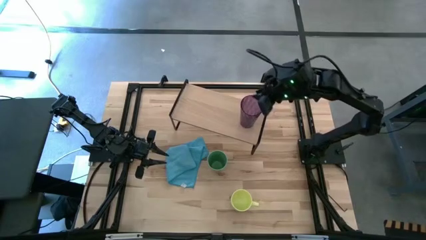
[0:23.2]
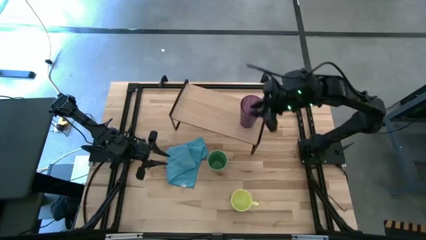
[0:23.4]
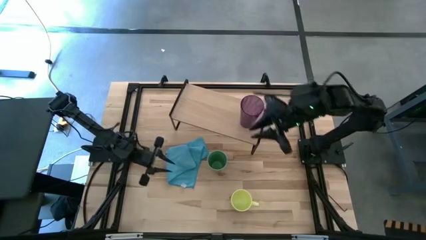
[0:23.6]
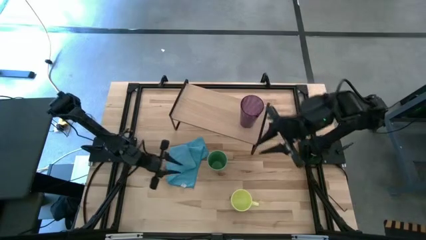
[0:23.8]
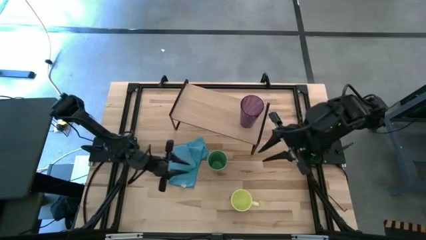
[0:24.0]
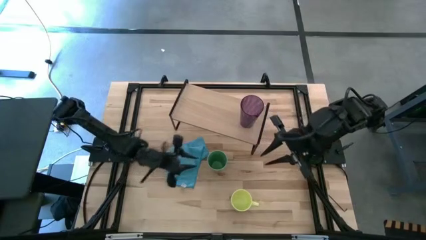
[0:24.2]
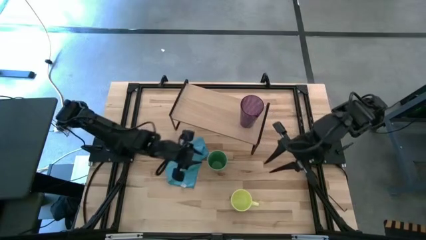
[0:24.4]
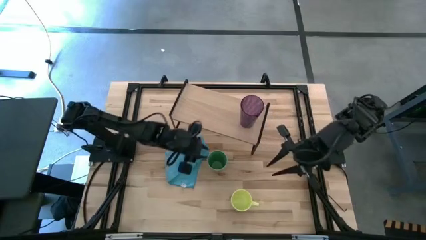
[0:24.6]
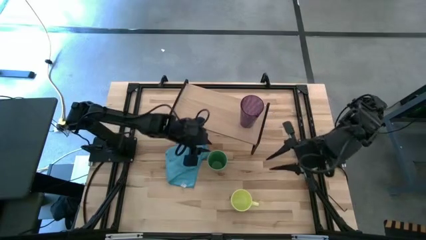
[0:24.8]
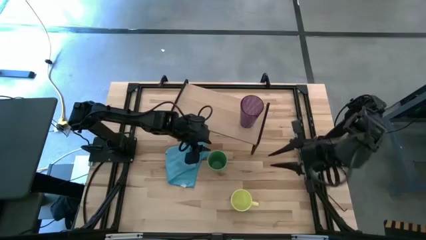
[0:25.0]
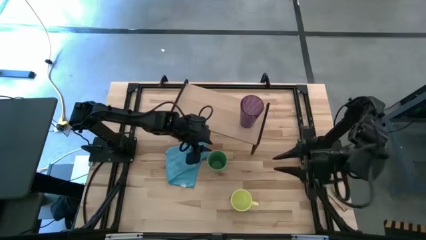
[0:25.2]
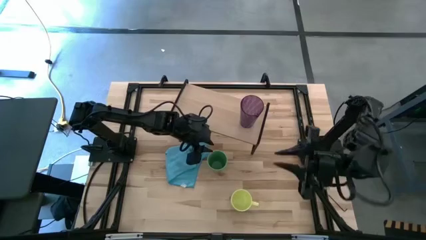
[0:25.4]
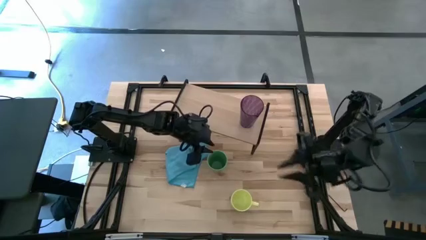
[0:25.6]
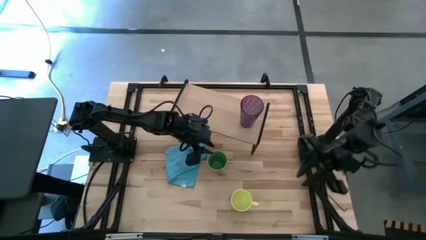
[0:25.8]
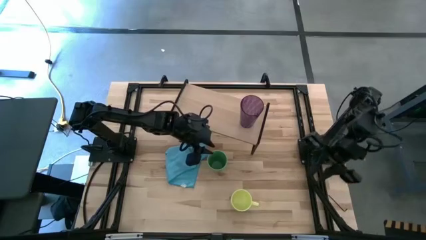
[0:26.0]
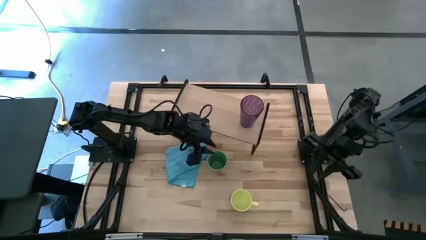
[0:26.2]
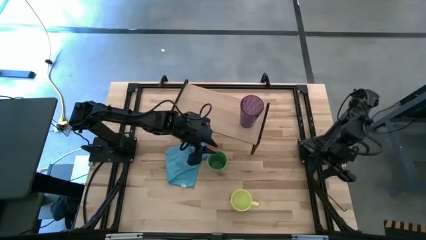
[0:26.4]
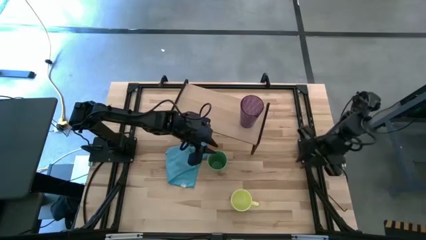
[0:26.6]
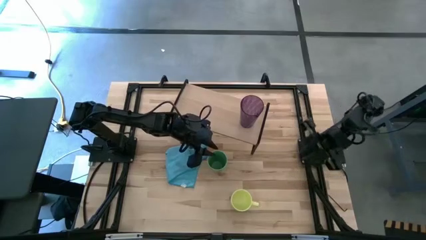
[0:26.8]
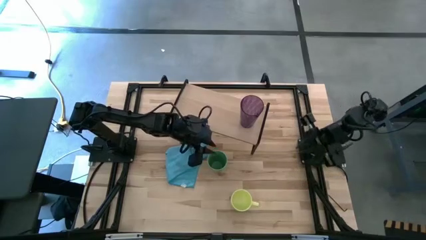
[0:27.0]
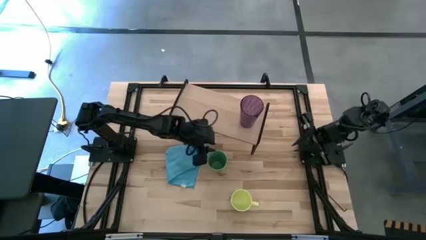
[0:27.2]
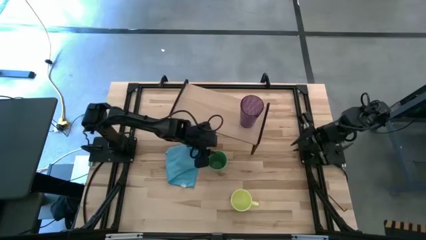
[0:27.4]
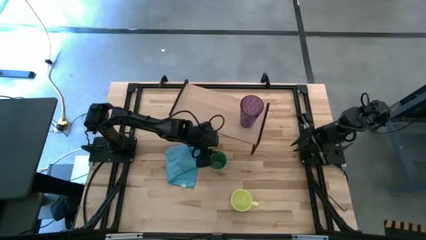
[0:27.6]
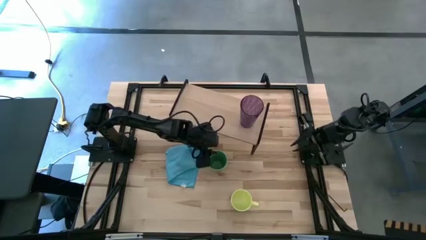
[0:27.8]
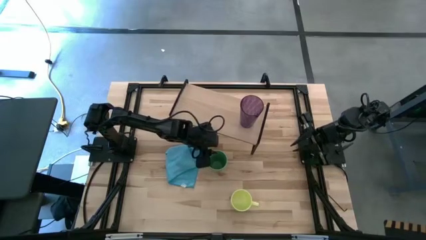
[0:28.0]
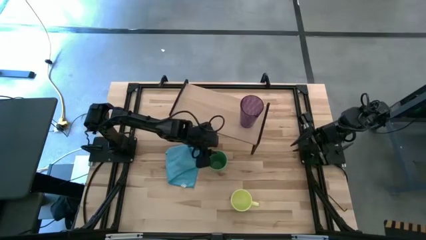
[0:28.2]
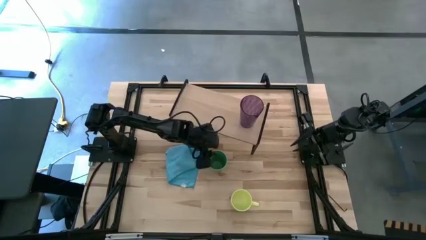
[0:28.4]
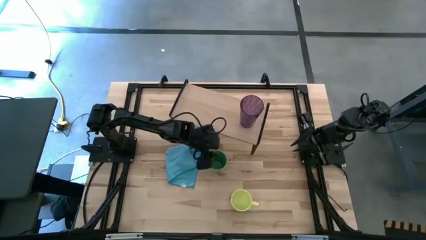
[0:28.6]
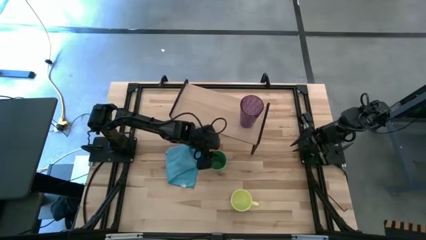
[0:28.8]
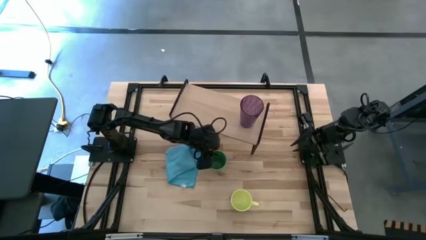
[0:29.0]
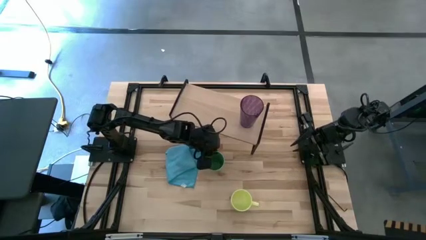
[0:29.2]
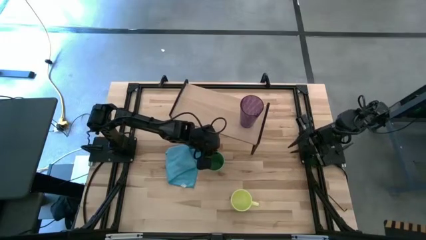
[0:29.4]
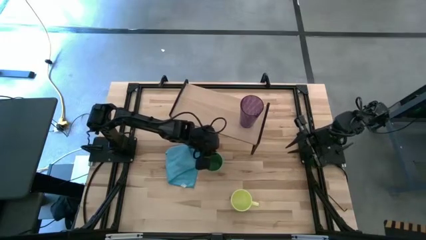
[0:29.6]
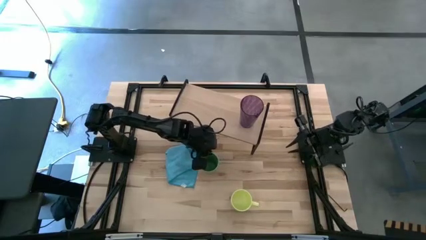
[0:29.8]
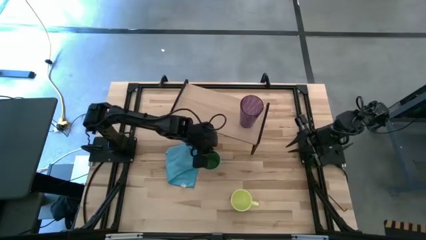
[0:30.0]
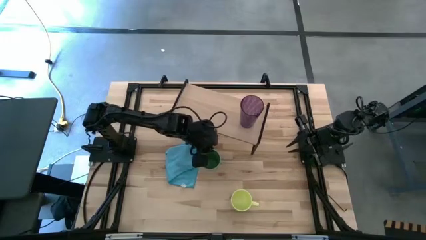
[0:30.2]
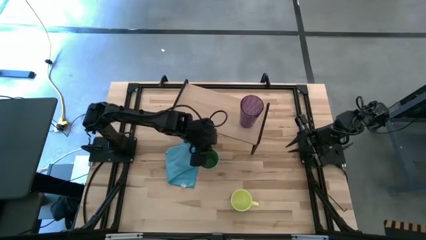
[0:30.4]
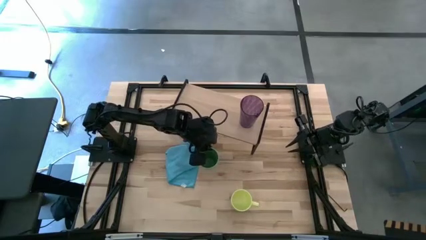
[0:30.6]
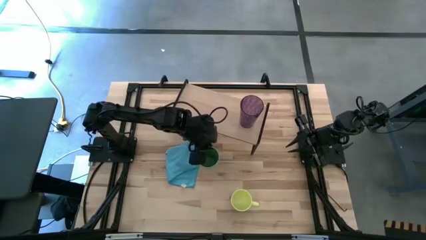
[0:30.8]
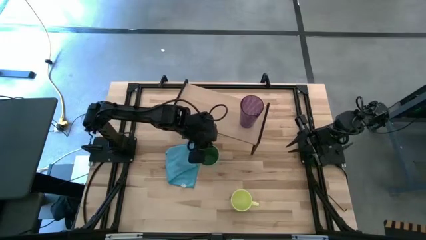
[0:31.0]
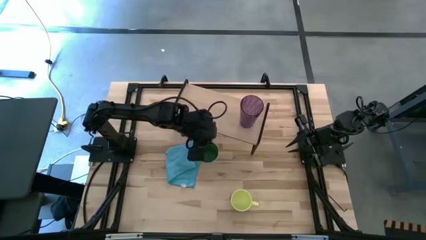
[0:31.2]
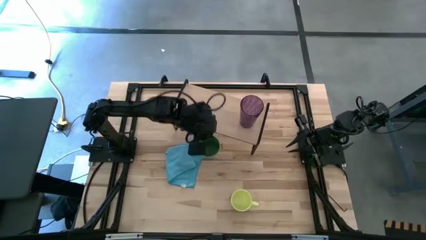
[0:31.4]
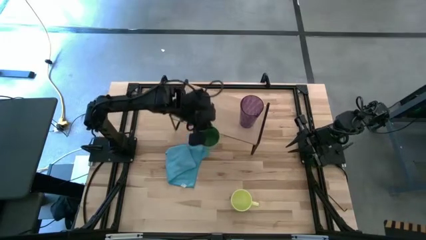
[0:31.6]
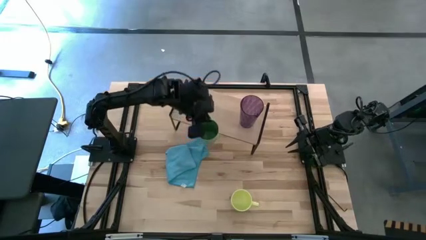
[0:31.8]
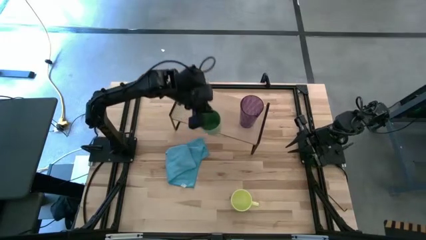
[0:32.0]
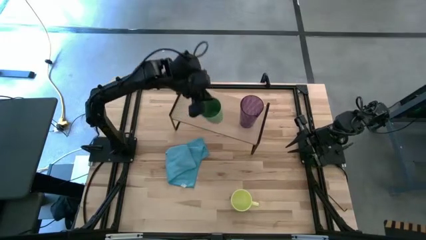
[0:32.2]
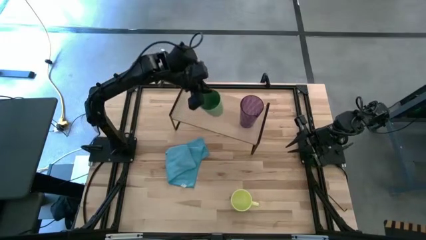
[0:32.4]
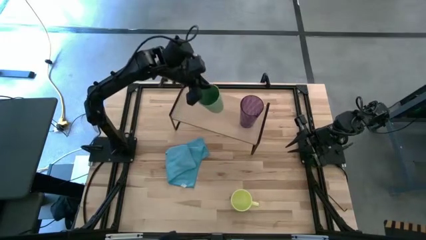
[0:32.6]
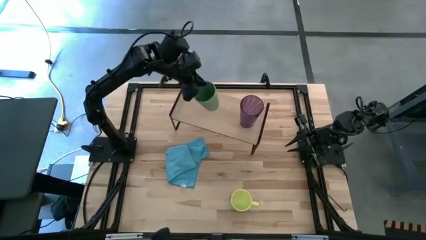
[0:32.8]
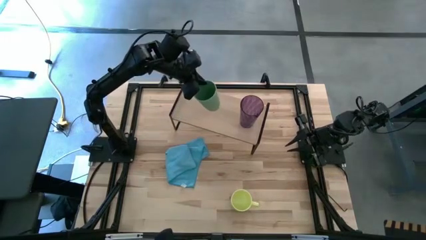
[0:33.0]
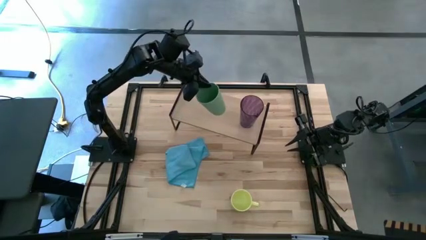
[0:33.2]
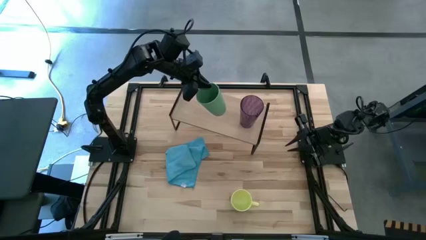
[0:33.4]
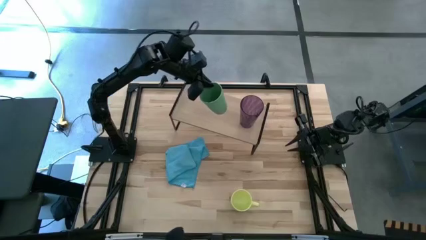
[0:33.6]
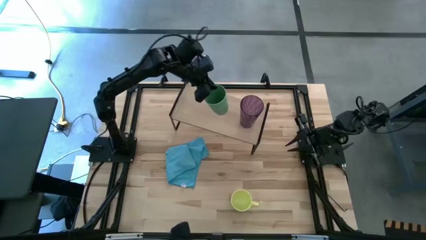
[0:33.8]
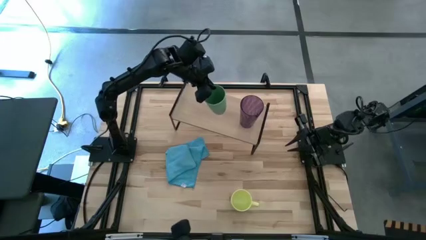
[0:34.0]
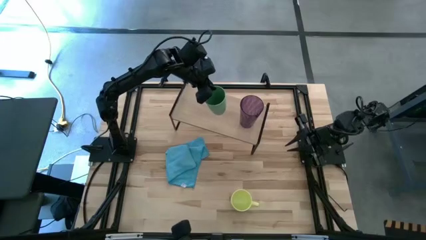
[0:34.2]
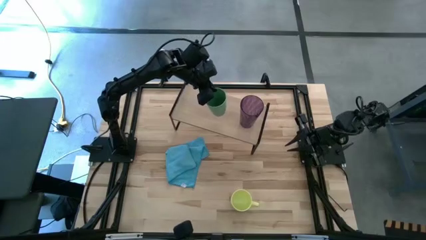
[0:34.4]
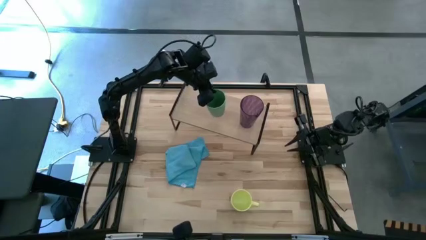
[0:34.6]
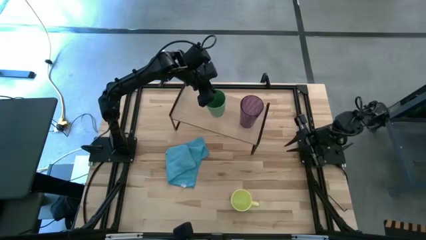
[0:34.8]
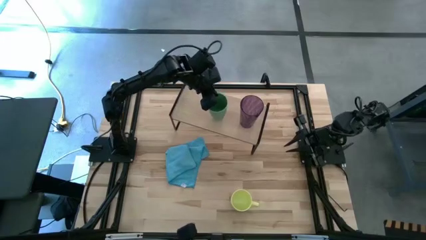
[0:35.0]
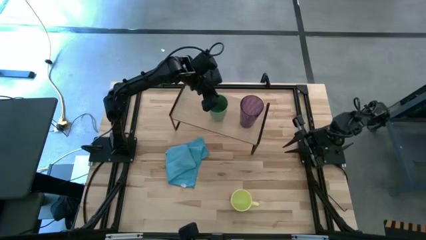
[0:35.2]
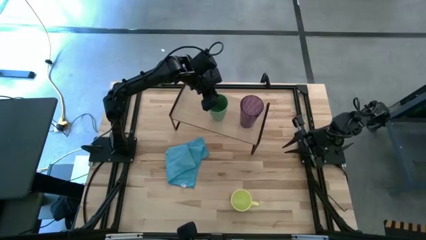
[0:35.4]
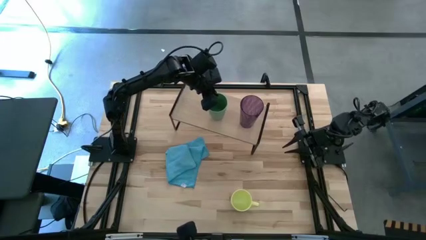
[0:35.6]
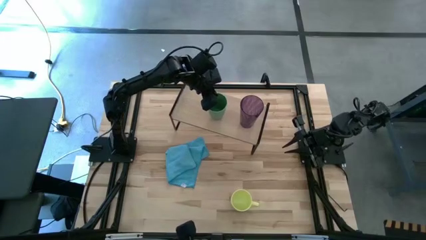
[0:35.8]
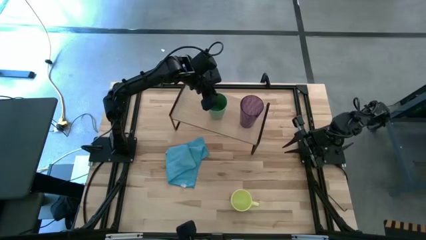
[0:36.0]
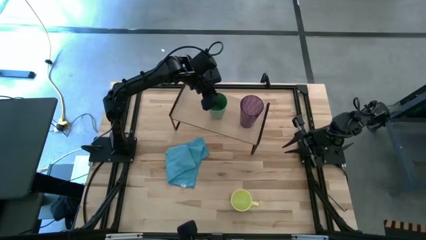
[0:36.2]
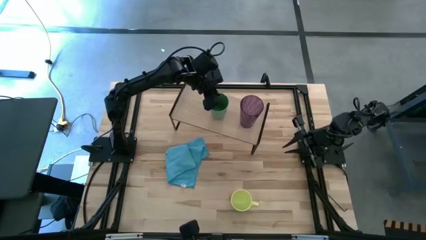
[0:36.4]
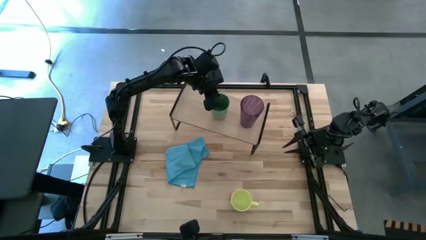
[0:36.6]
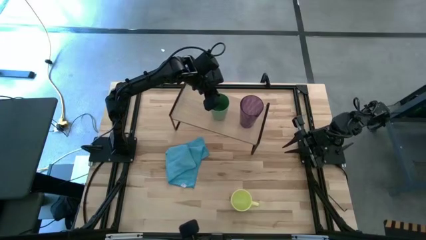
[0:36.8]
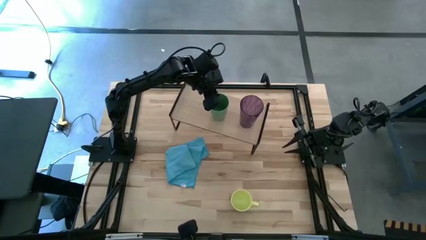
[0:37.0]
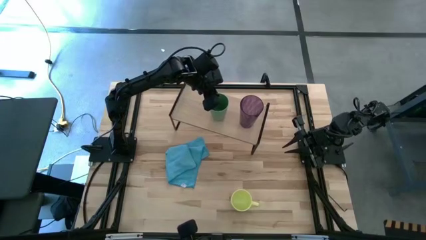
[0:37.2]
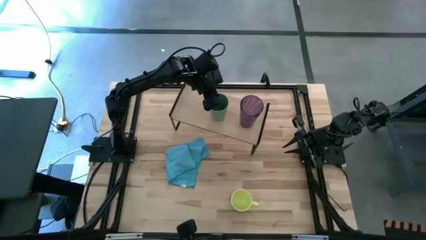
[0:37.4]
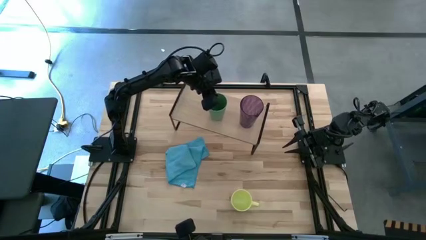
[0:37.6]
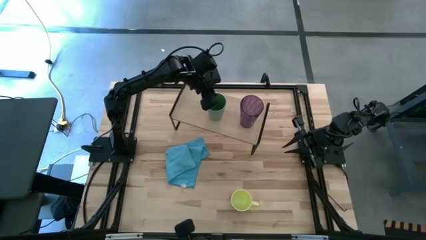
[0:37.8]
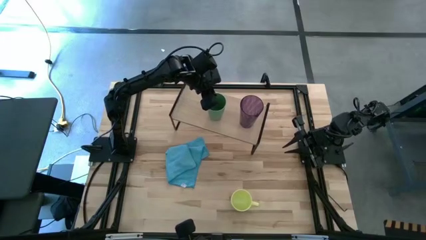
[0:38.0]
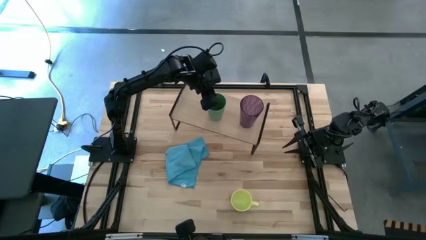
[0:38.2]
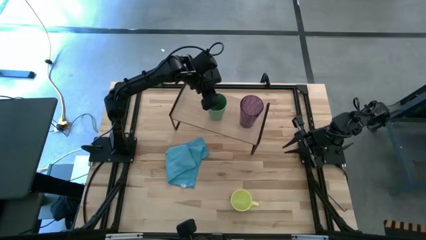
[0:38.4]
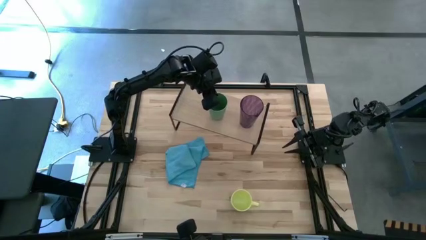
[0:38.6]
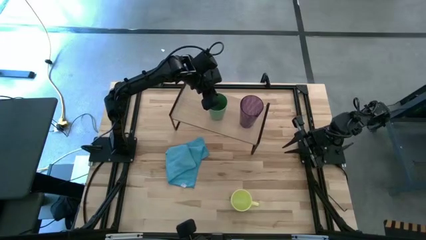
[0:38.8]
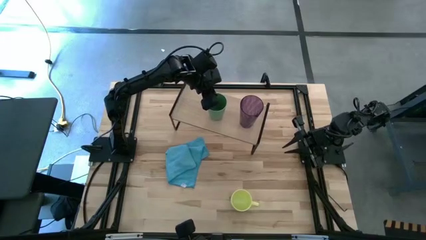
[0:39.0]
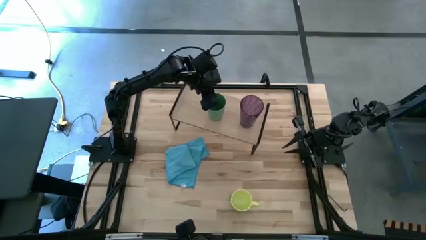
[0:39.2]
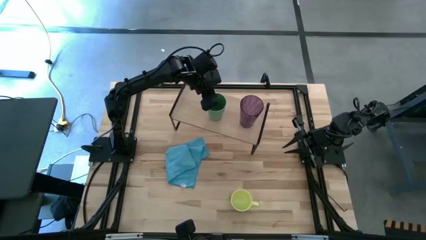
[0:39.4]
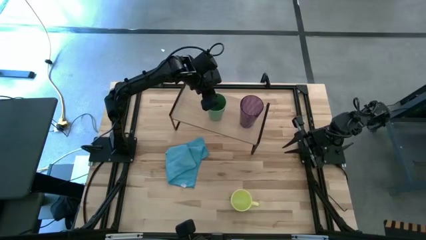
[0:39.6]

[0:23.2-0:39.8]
Task: Stack small to large cups/mugs on shelf
Put the green cup on the shelf
